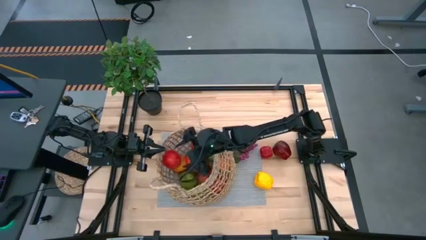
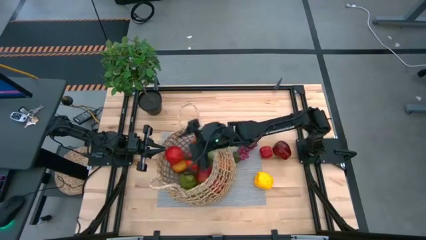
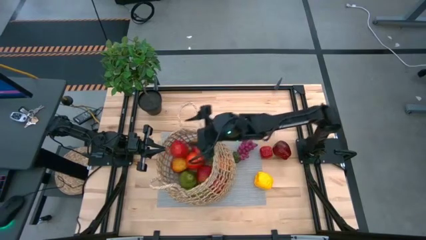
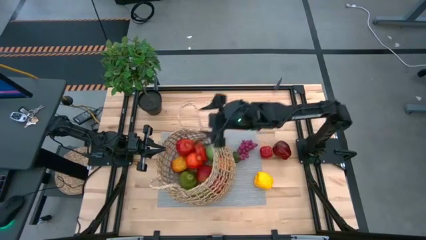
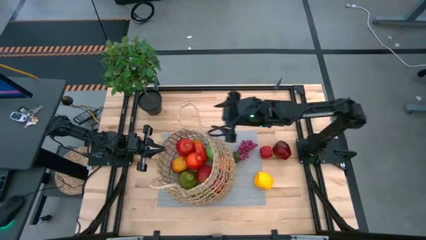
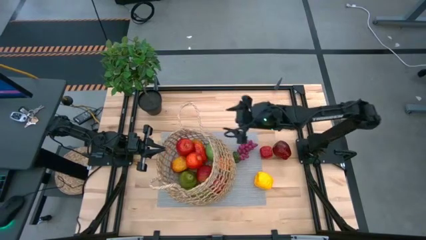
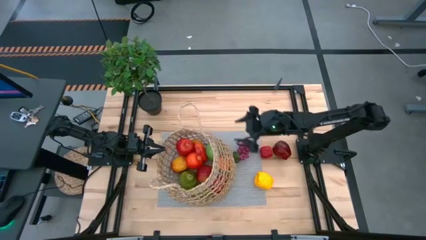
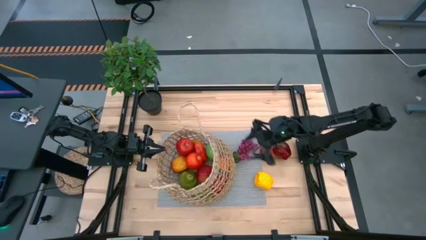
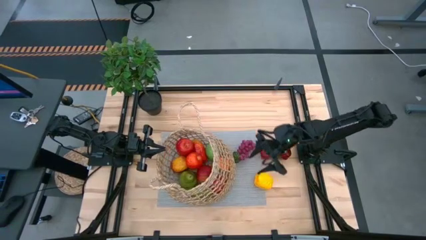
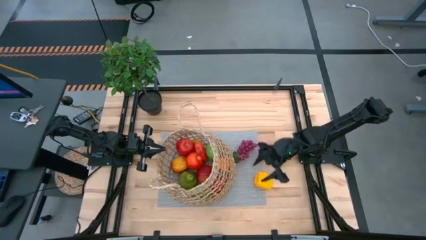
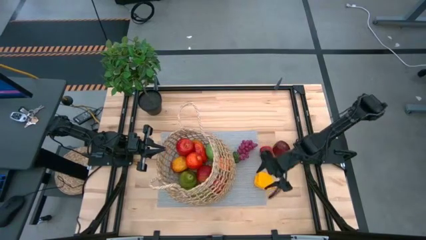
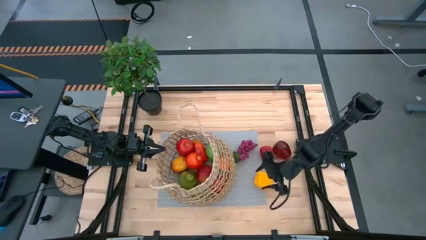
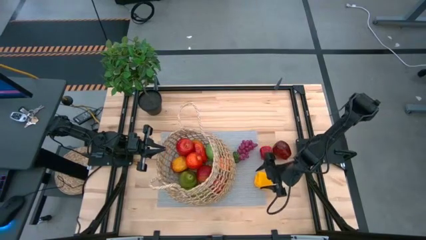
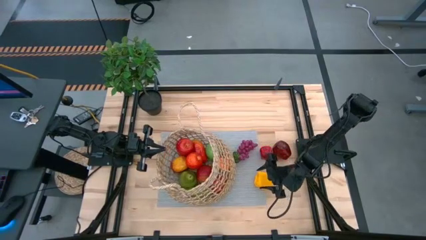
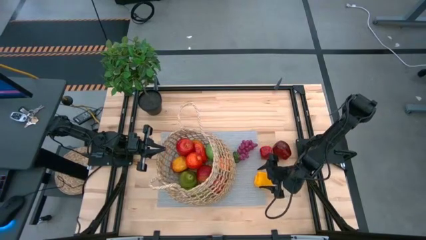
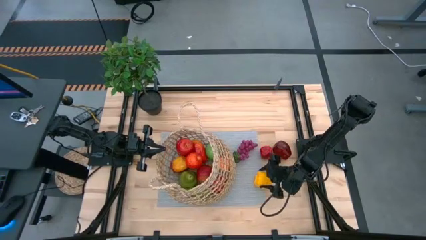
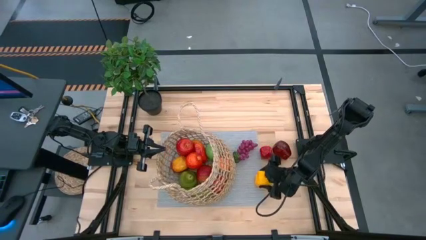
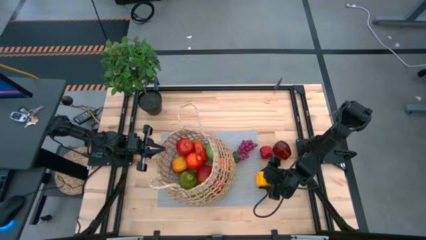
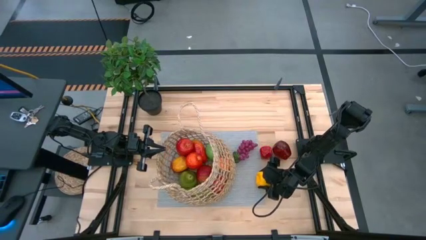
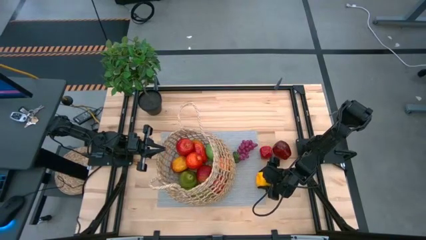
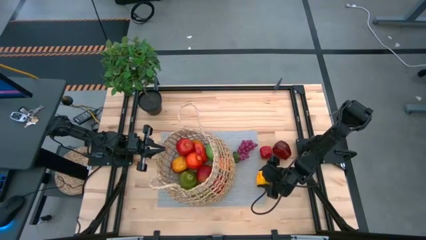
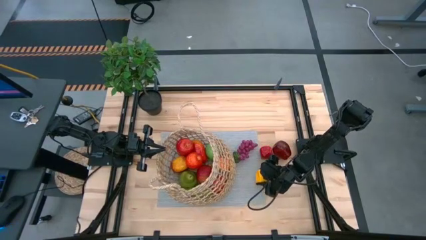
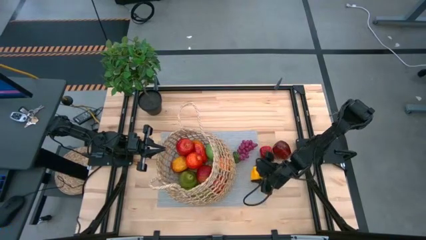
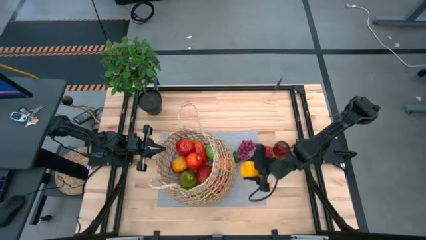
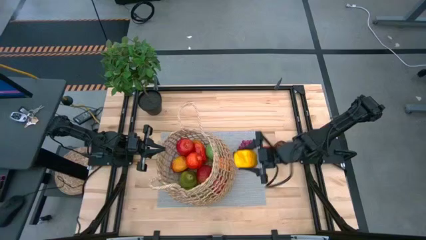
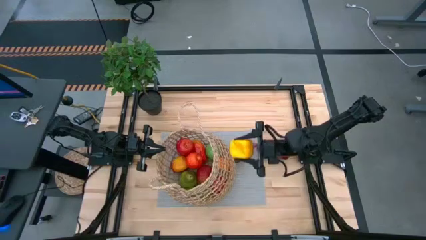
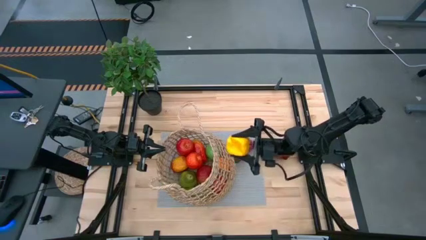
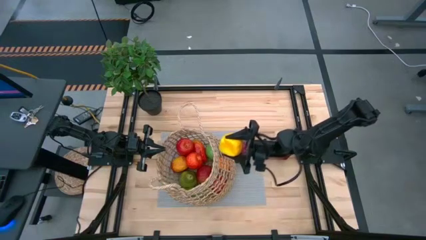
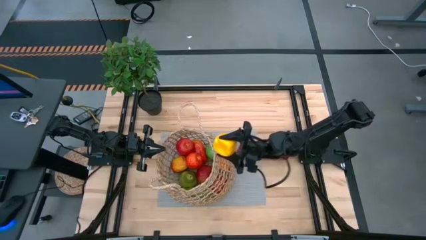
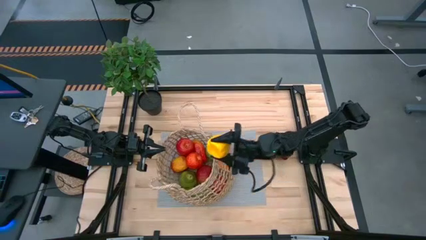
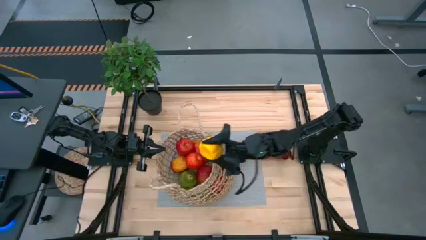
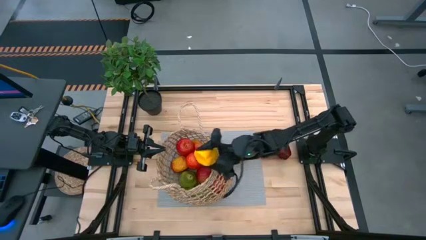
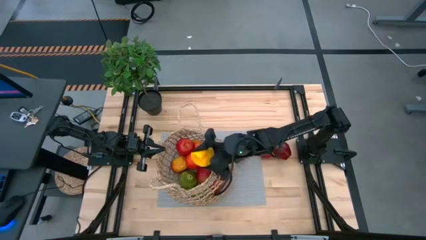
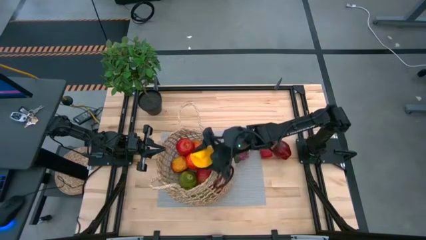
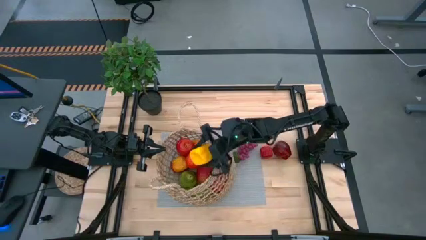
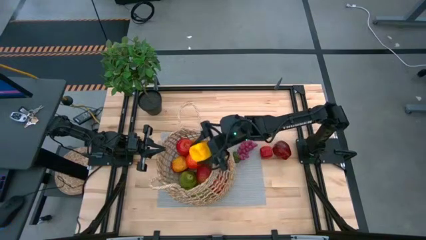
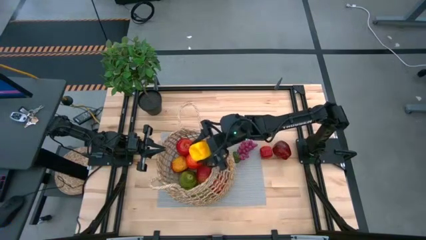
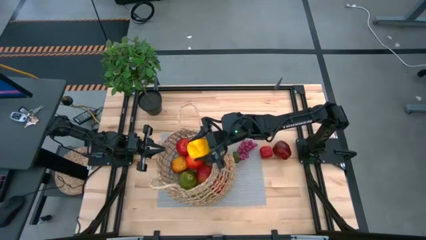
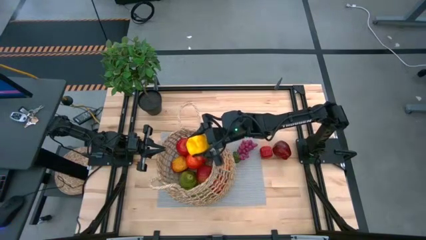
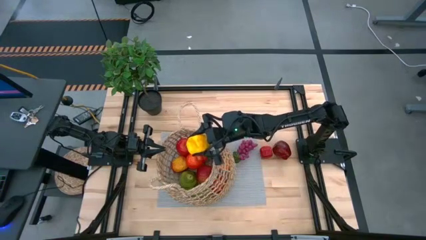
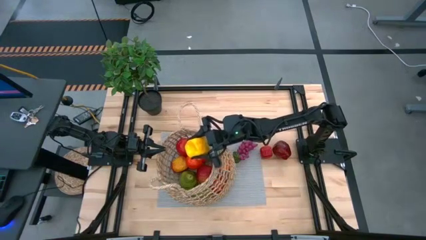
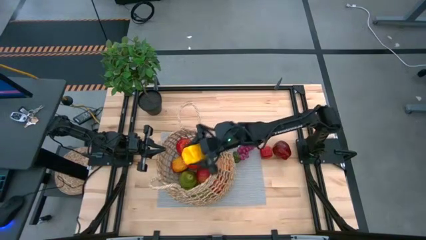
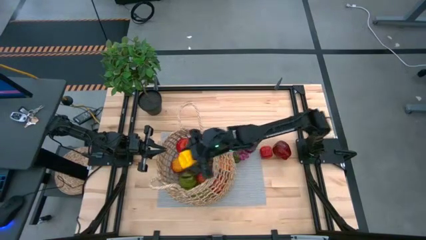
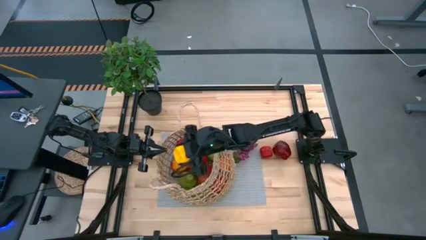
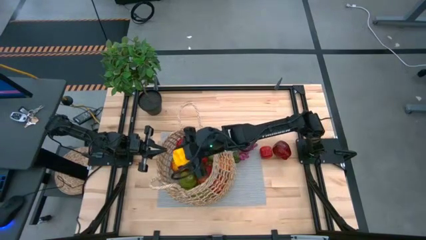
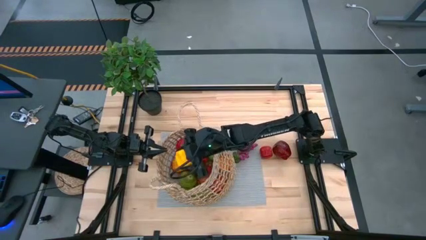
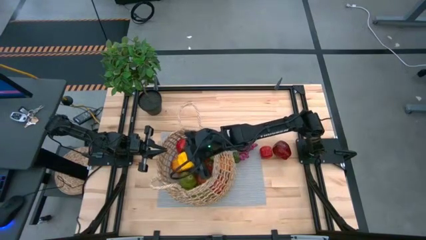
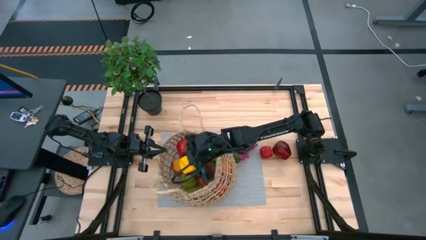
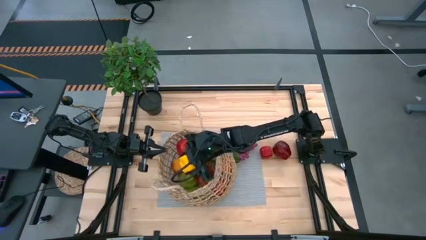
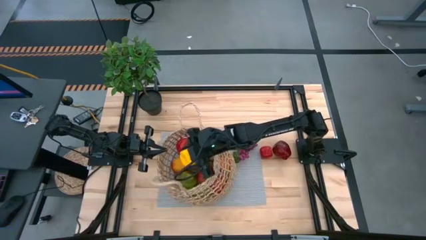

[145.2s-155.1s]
Task: Build produce basket
Put the bell pepper into the brown basket

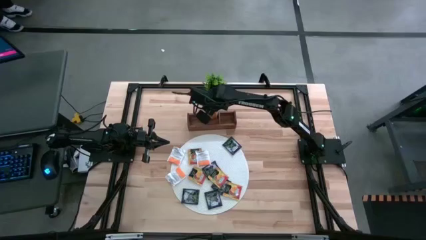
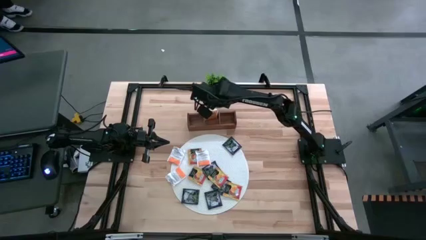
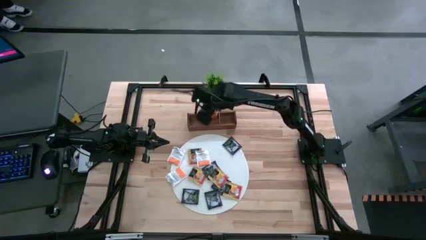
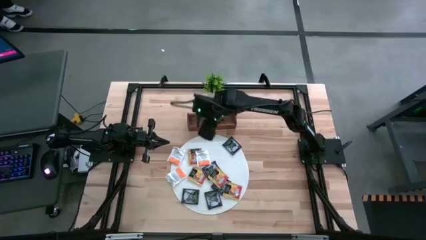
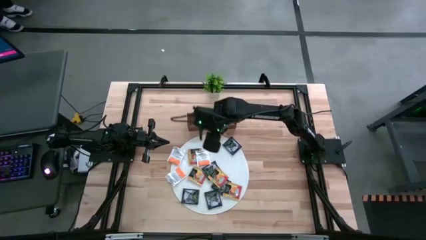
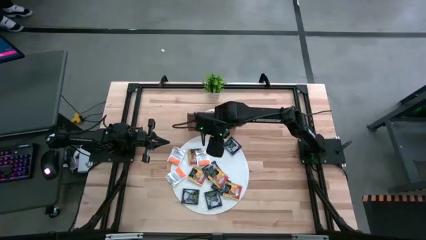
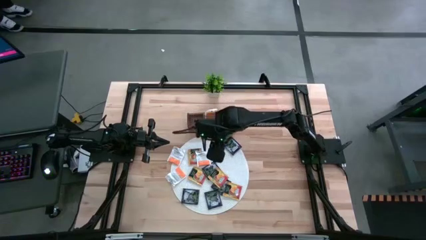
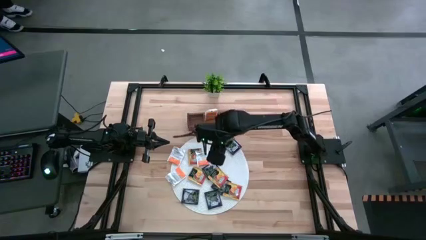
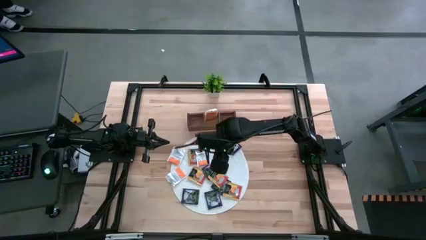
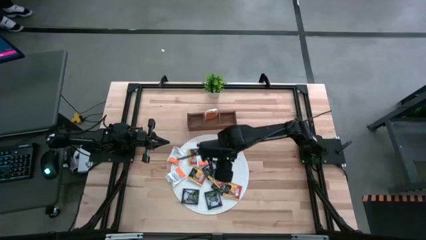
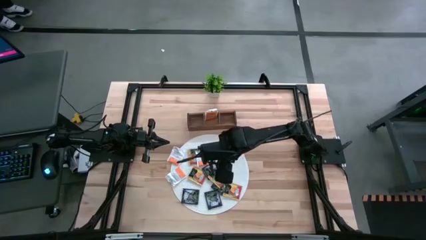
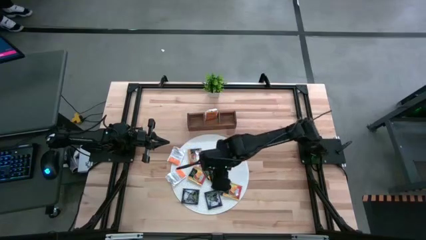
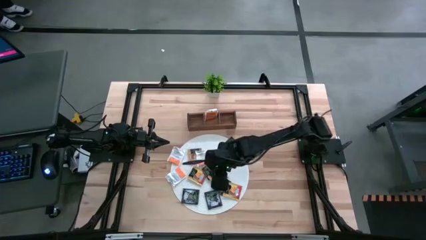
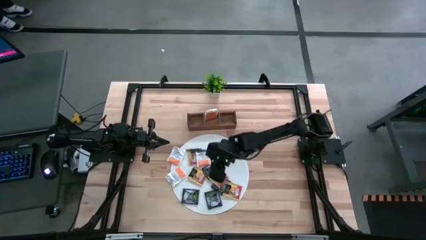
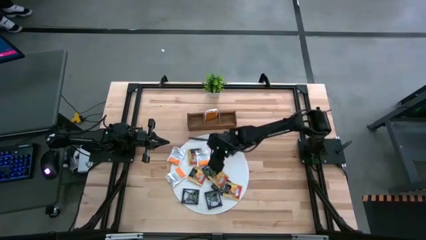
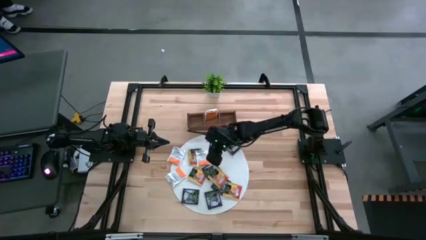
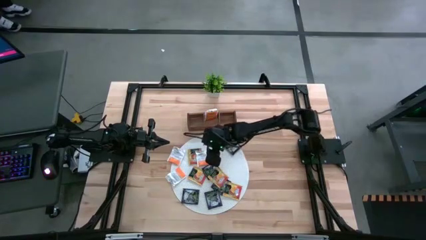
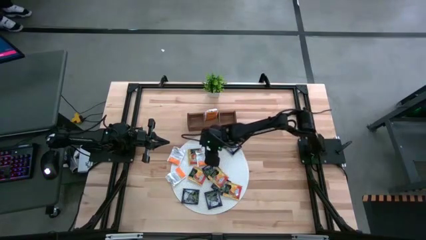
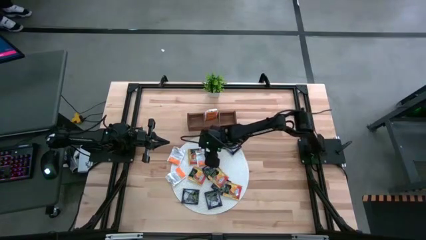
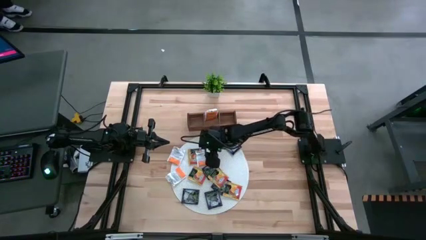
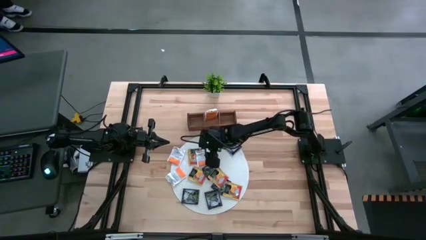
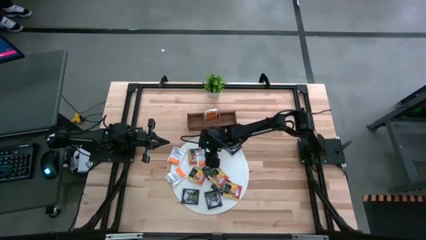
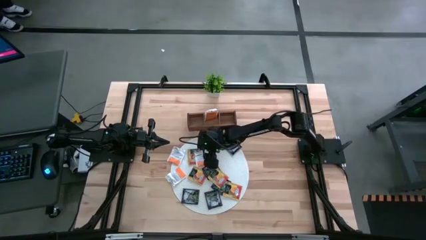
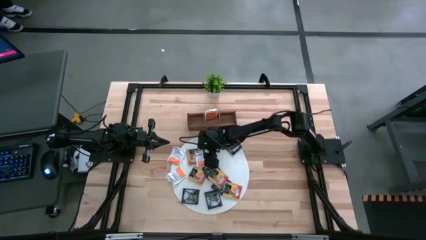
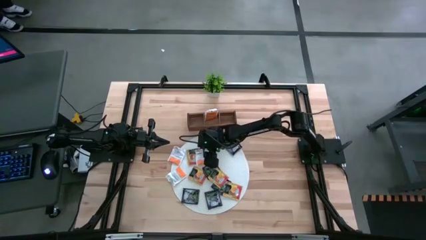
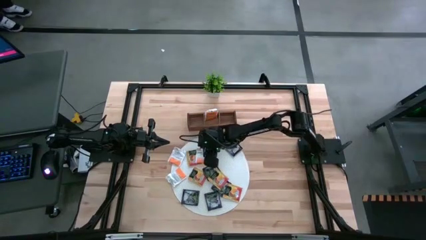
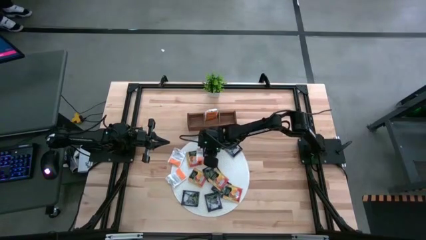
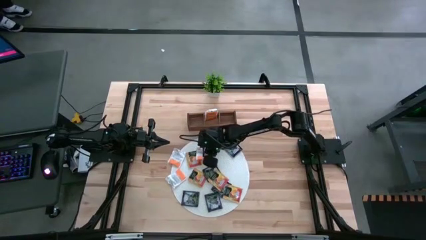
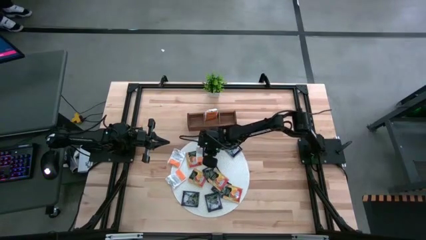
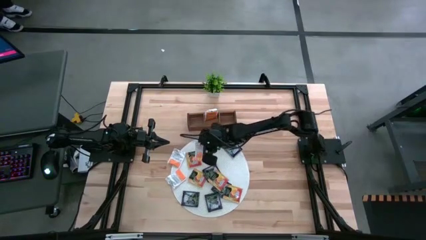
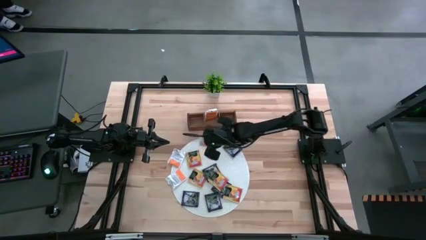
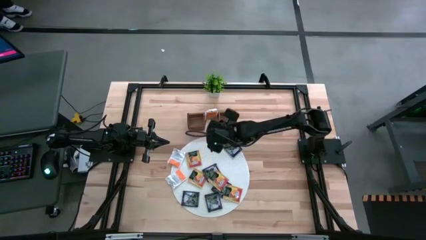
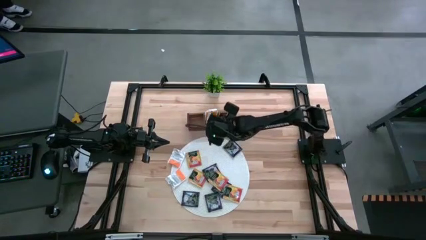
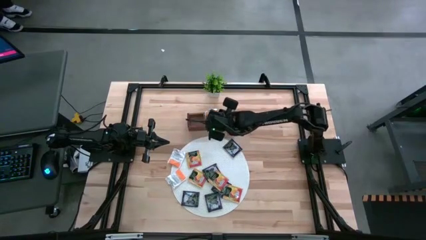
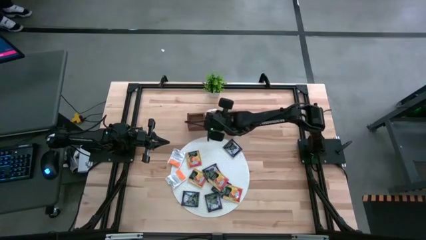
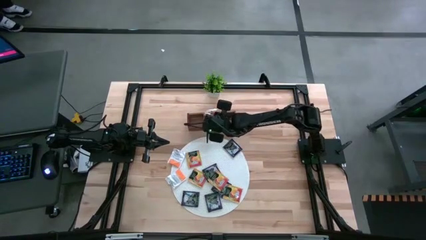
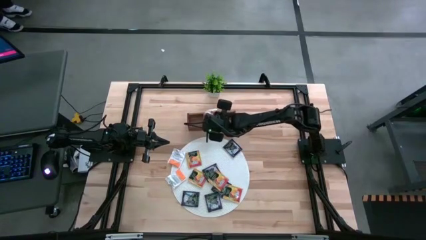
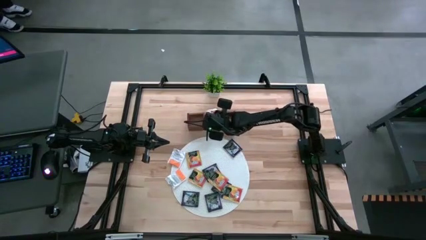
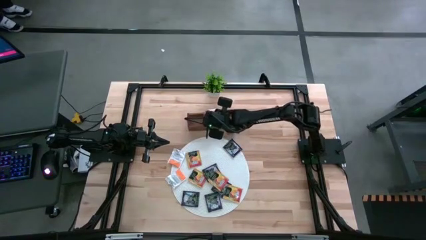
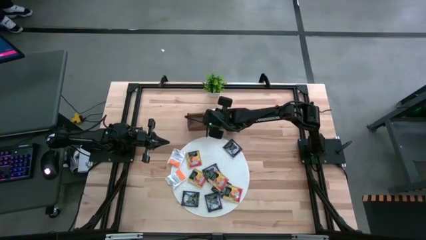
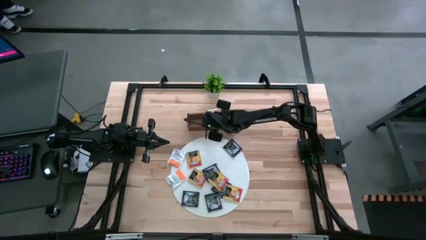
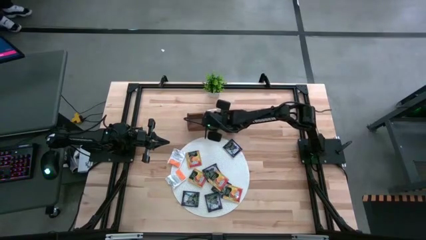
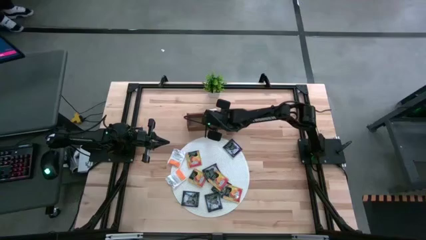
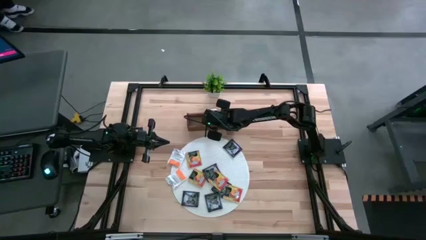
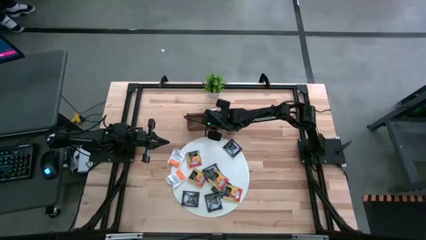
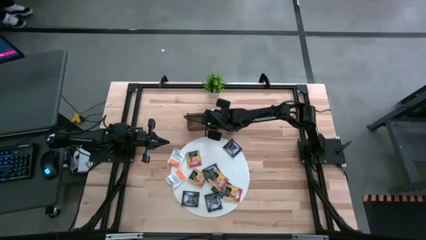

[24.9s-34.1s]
Task: Pick & Place Tea
Put the orange tea bag into the middle section of the wooden organizer
